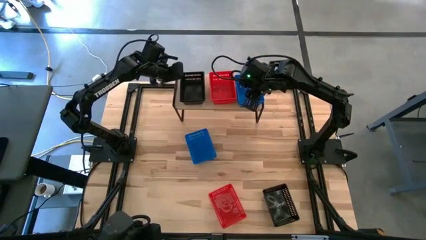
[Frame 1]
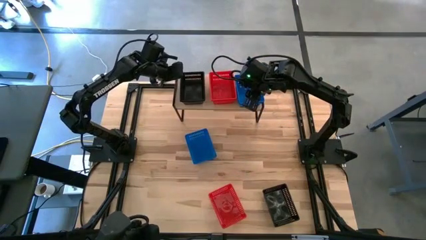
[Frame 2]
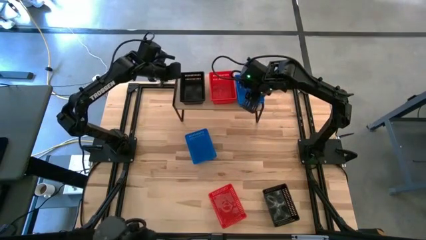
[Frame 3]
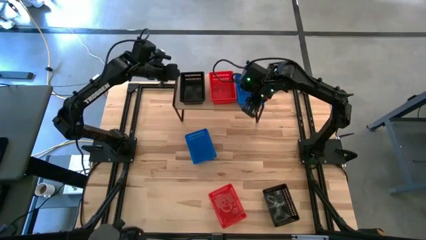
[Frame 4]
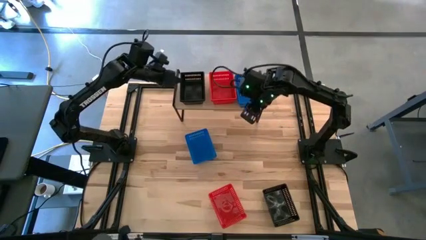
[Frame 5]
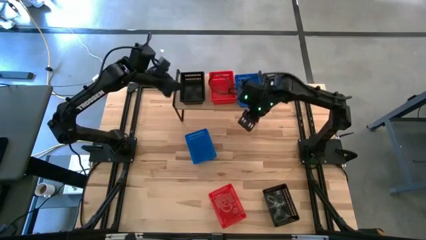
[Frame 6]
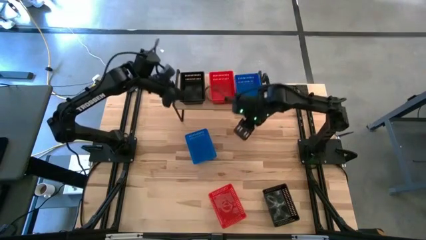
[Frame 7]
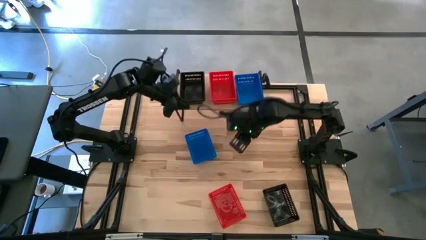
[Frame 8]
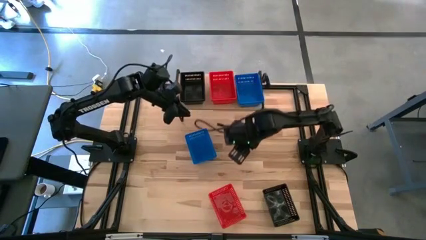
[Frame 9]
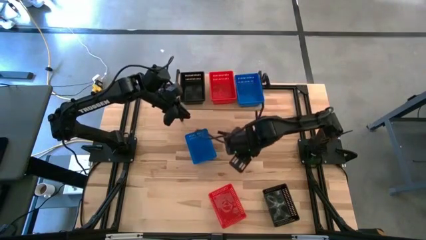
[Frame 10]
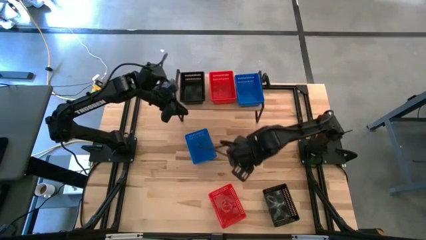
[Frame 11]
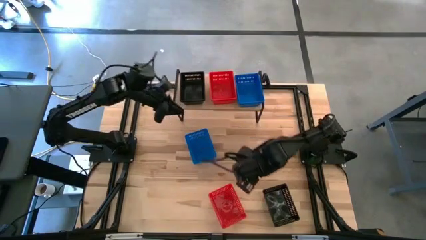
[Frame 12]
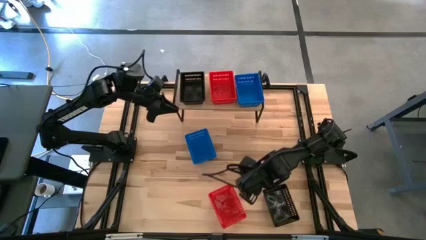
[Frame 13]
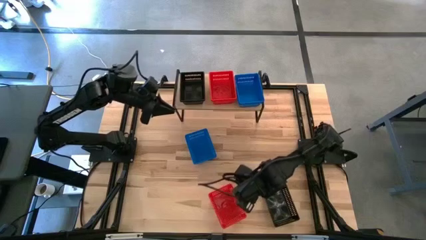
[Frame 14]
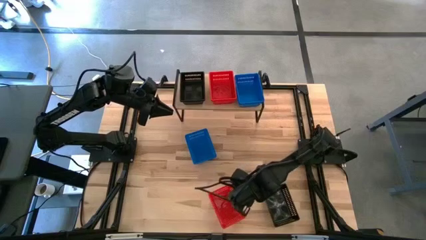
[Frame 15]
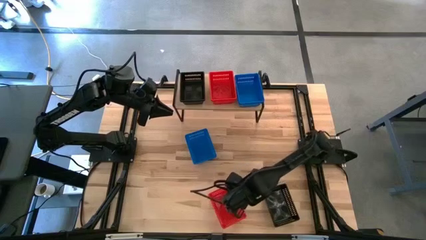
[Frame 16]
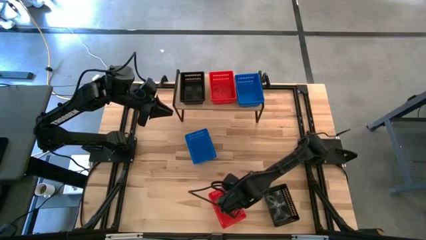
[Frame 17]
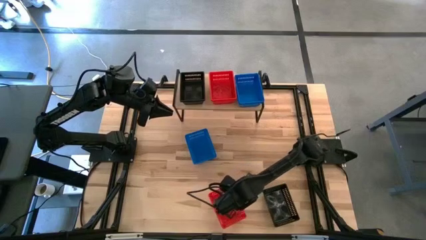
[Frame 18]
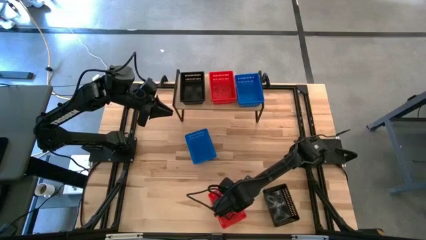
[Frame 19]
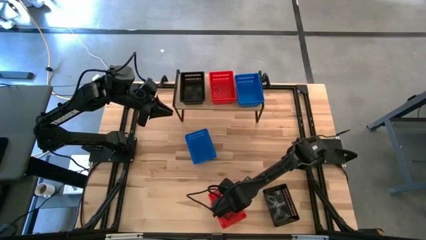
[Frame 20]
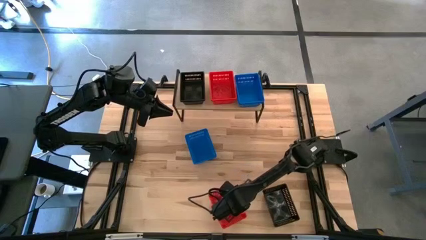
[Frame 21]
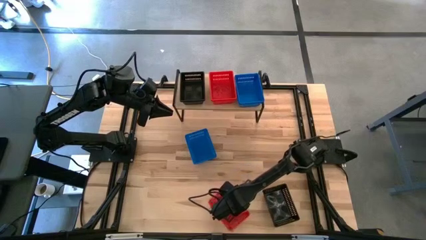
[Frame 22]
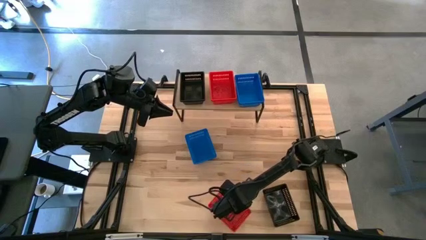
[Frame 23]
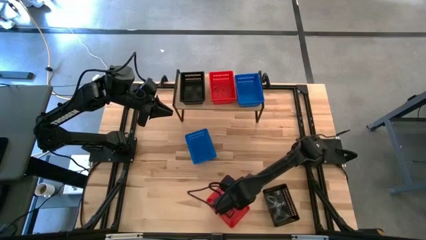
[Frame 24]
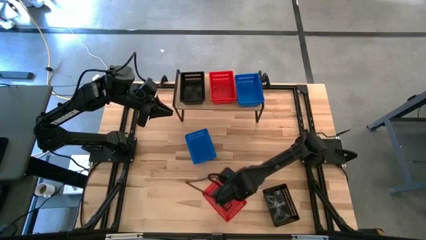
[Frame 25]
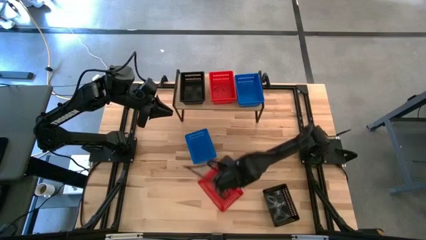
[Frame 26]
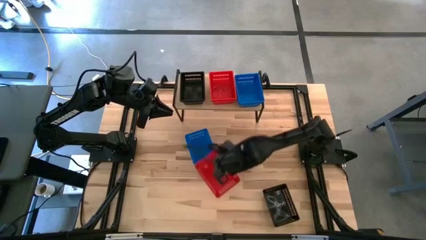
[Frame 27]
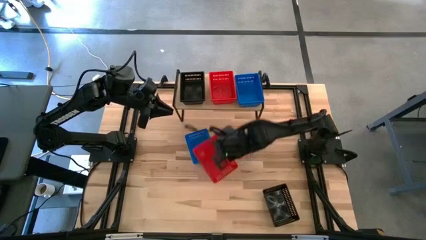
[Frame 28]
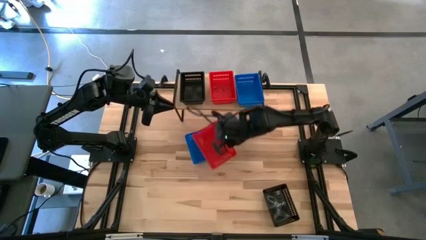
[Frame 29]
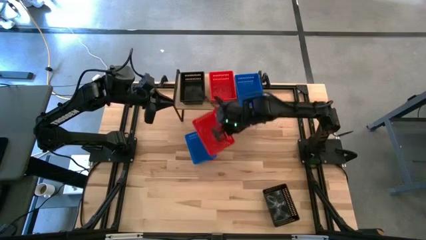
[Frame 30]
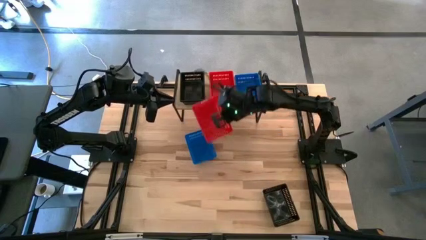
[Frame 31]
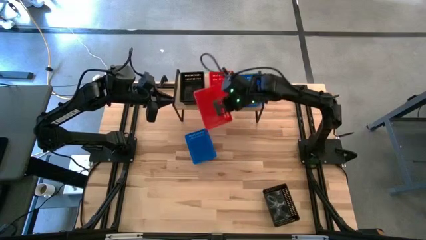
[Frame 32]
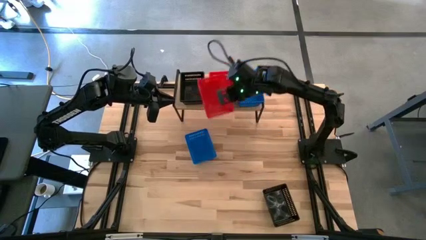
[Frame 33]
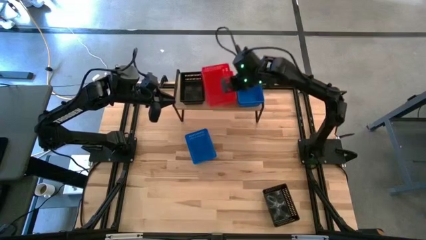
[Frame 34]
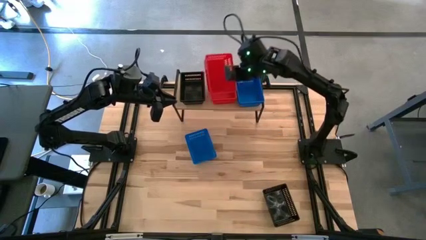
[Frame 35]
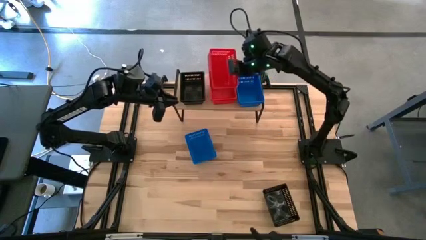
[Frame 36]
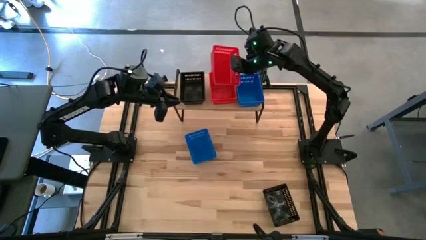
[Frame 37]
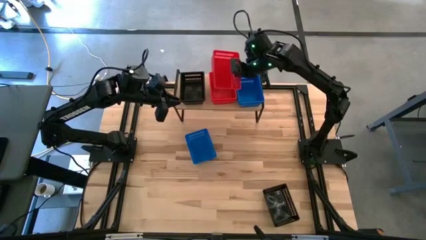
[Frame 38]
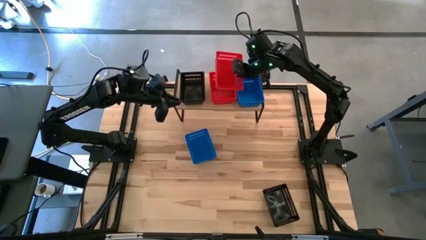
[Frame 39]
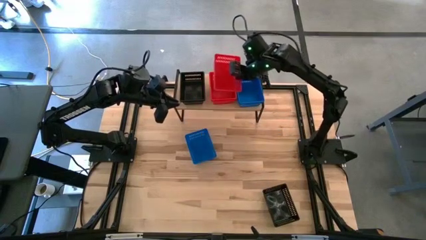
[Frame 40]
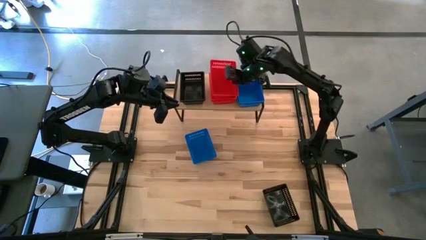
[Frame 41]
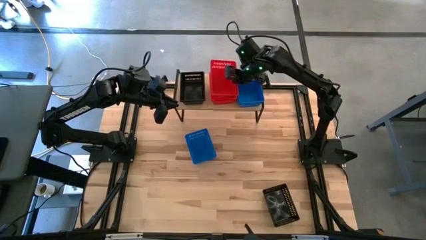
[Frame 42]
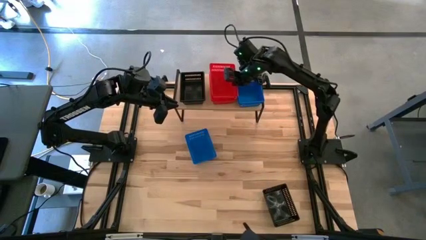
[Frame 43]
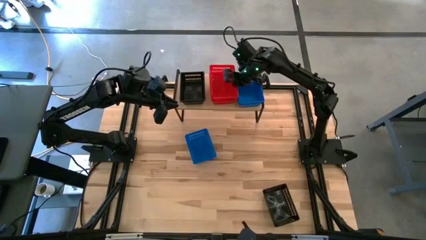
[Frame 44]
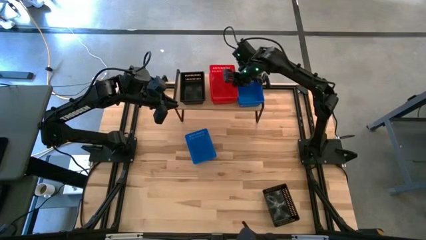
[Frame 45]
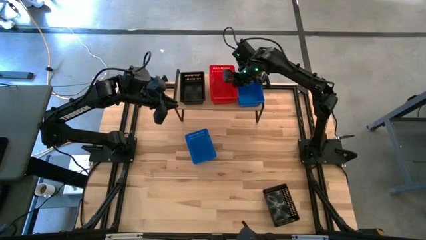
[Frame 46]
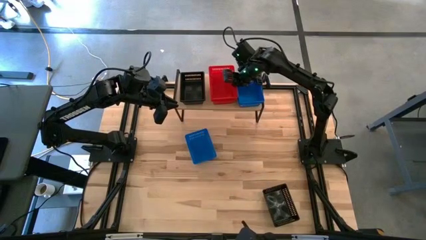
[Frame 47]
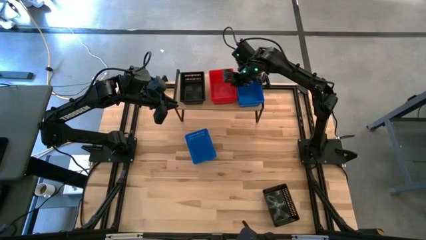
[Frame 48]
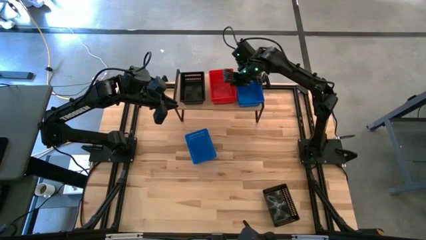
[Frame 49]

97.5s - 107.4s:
Task: Stack baskets on shelf by color
Stack the red bin on top of the stacked red bins on the shelf

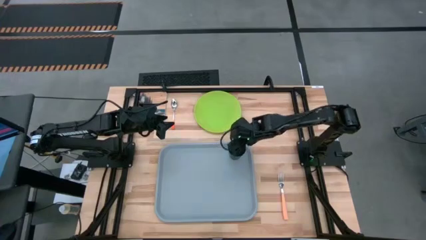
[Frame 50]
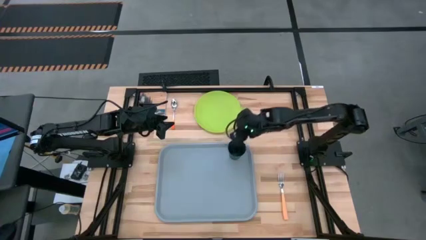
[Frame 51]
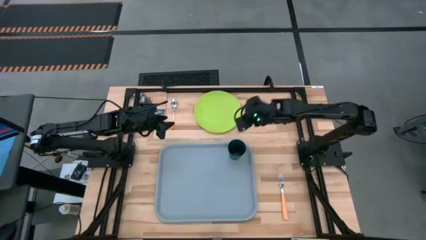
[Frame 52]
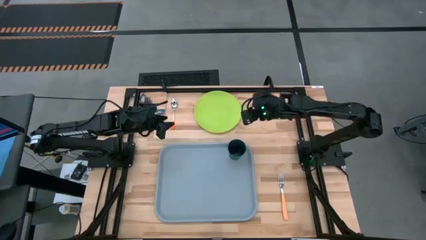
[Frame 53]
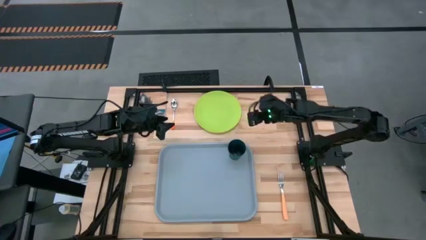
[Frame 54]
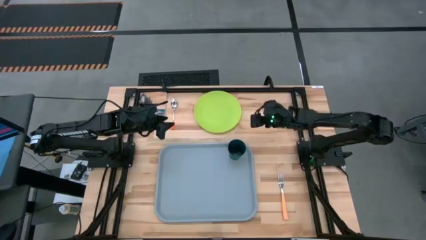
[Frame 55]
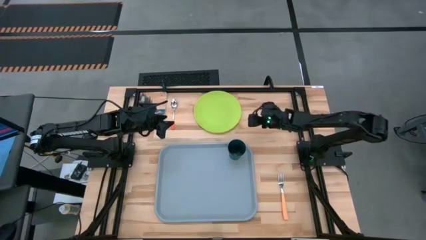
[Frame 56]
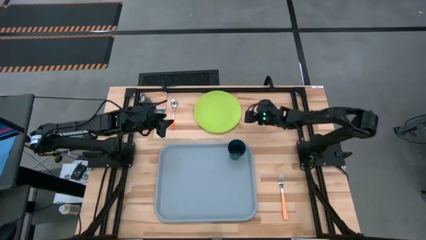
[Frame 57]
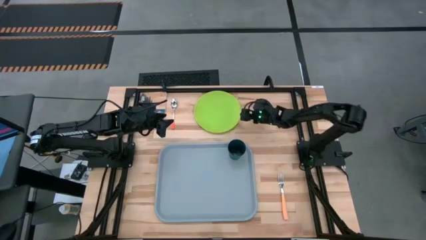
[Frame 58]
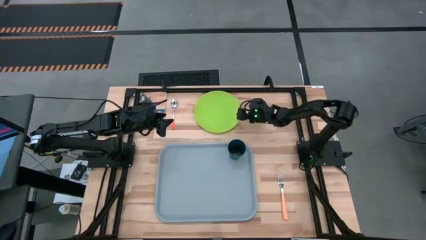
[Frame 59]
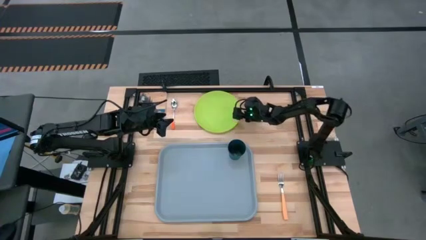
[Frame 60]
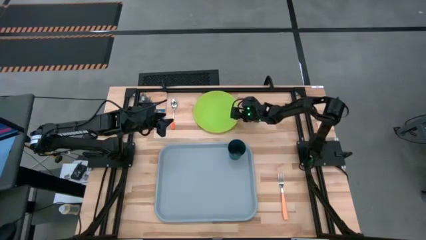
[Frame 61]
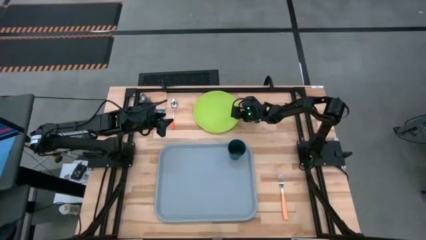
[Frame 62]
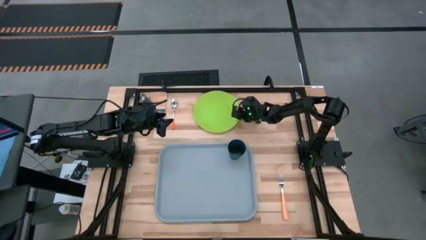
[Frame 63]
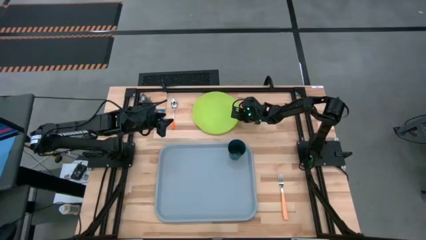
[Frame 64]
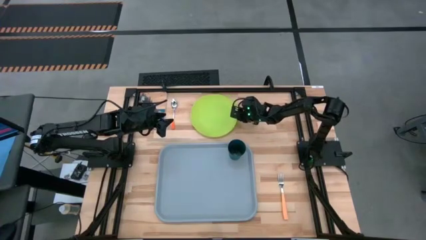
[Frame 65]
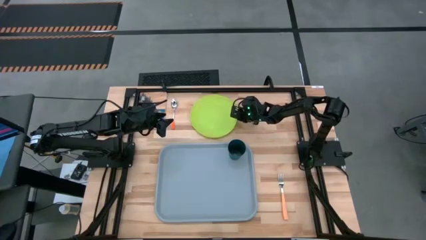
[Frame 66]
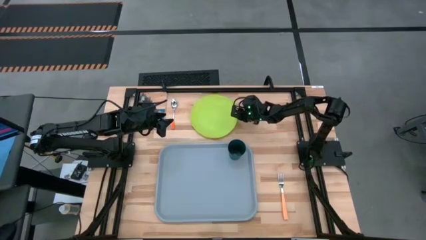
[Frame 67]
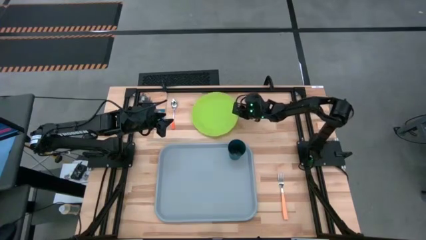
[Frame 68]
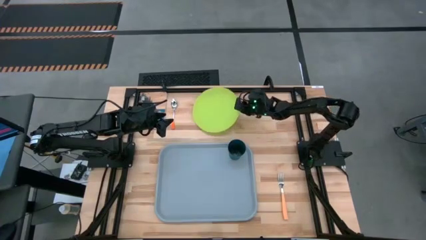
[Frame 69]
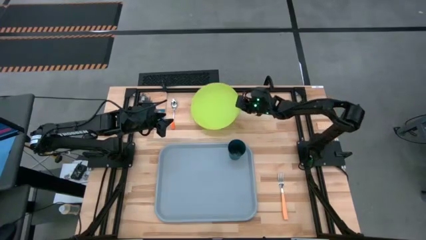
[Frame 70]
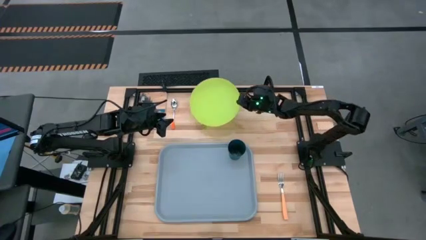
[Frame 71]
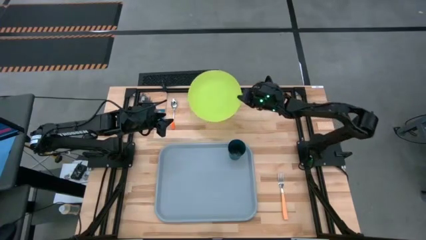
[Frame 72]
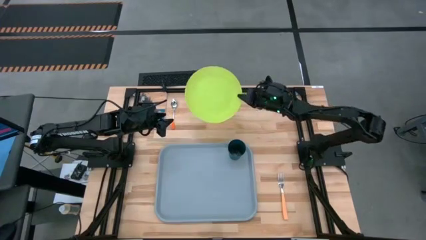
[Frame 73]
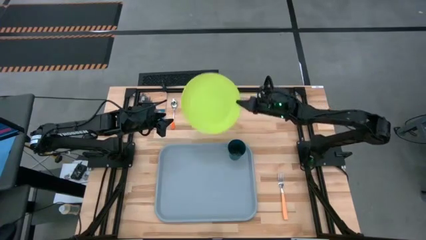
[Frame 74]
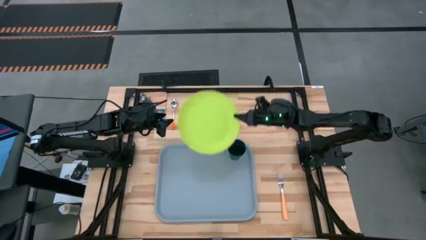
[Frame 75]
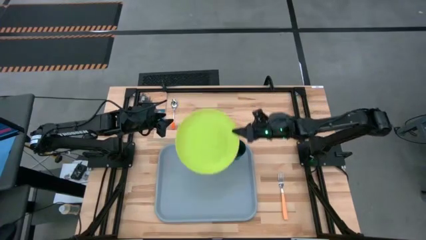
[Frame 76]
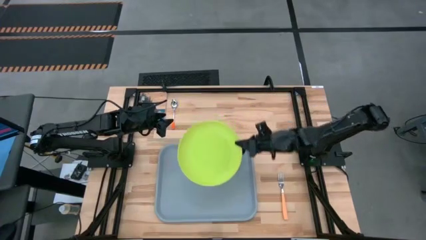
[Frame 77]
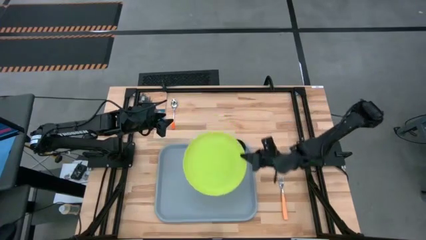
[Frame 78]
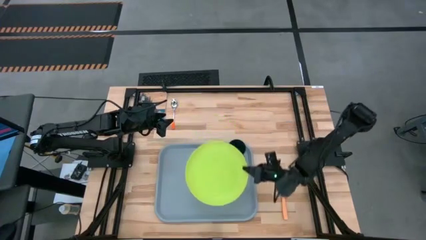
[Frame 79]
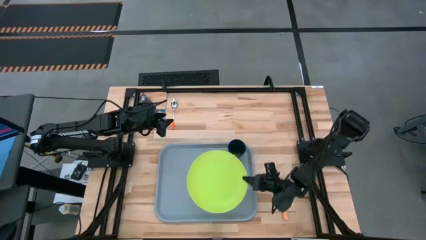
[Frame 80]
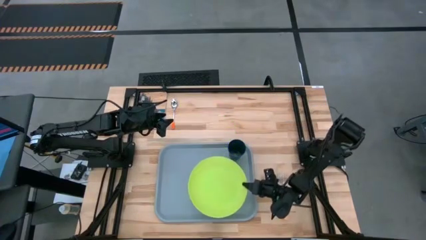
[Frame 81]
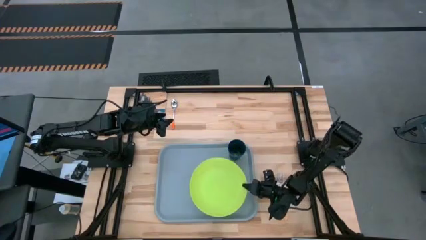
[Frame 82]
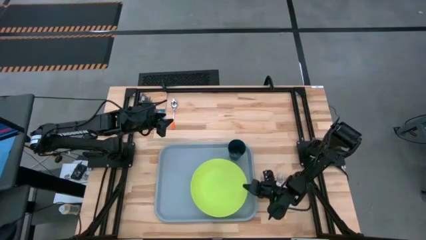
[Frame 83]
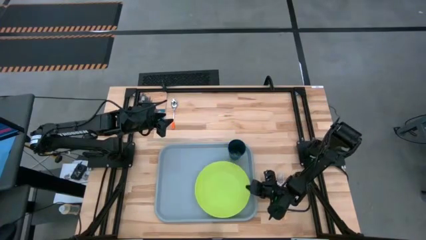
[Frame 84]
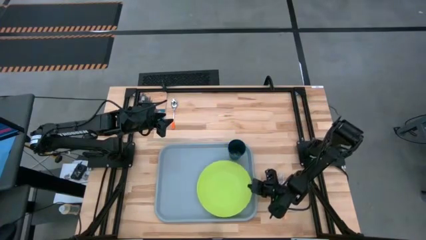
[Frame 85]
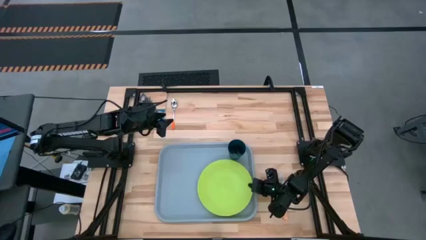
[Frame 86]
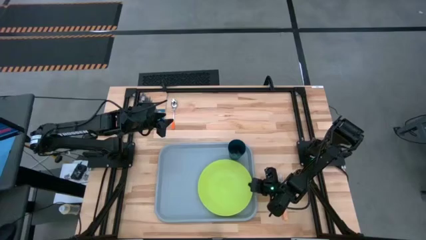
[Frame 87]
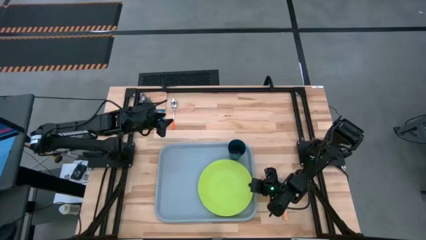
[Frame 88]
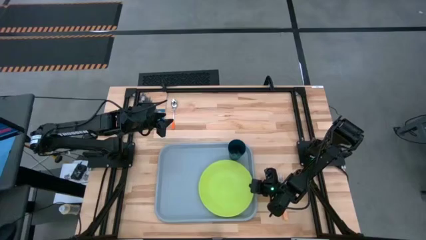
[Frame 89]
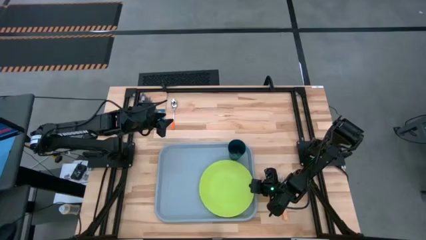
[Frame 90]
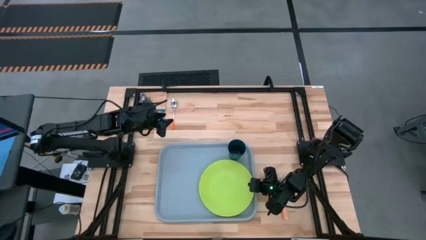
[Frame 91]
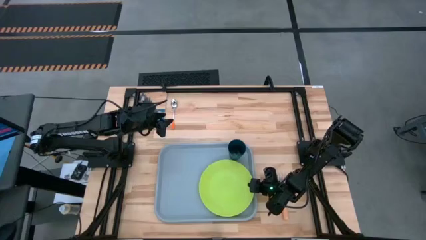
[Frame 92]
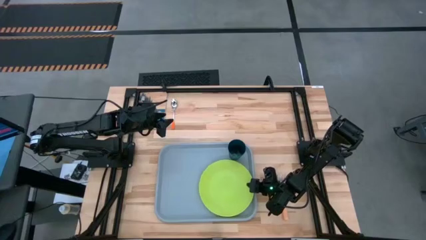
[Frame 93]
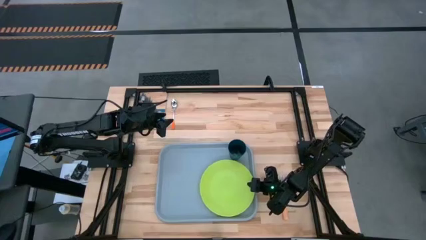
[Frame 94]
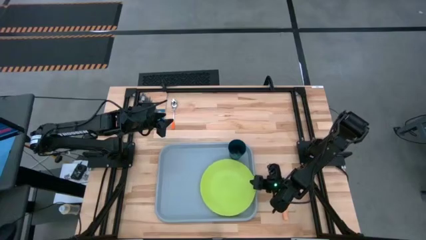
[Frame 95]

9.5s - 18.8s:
Task: Pick and place plate/cup/fork/spoon on tray
Put the green plate on the blue tray to the bottom left of the dark blue cup
